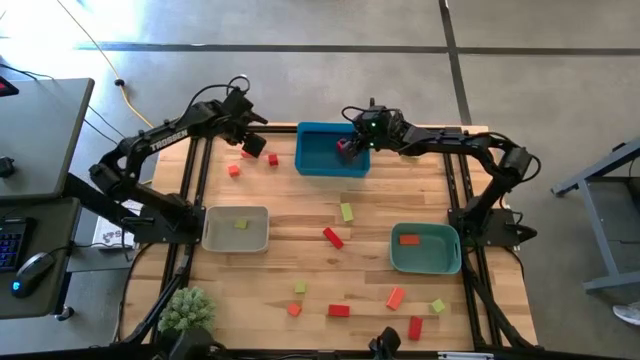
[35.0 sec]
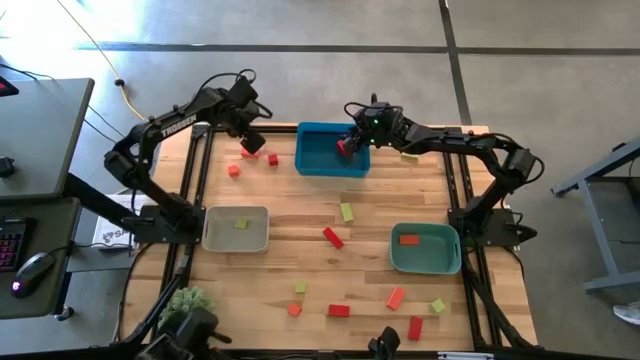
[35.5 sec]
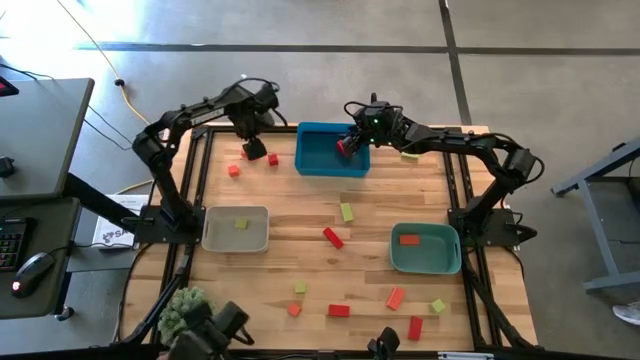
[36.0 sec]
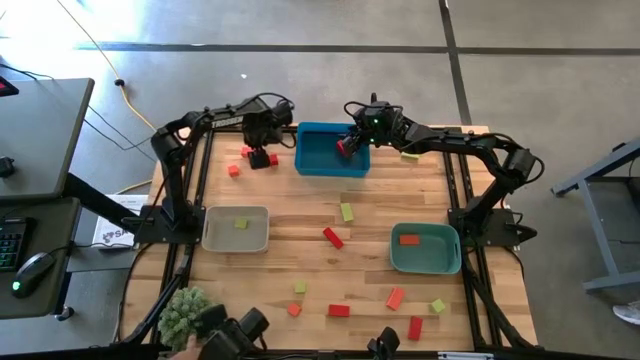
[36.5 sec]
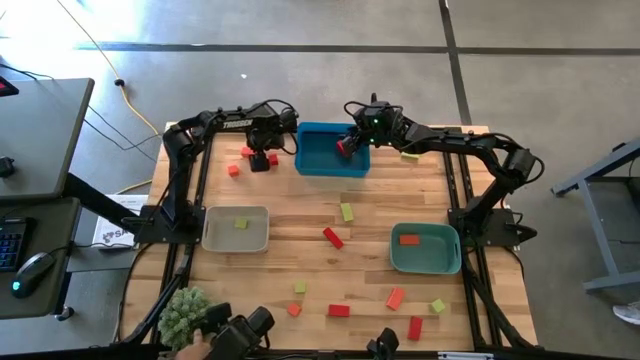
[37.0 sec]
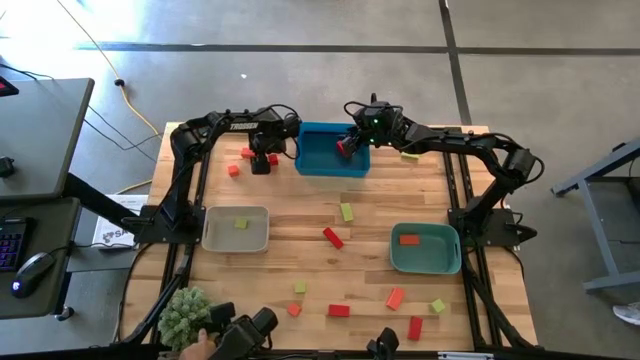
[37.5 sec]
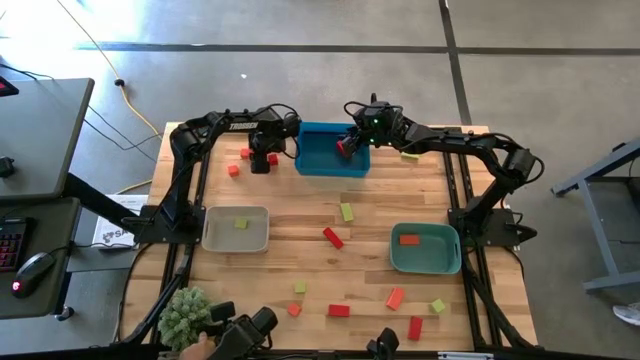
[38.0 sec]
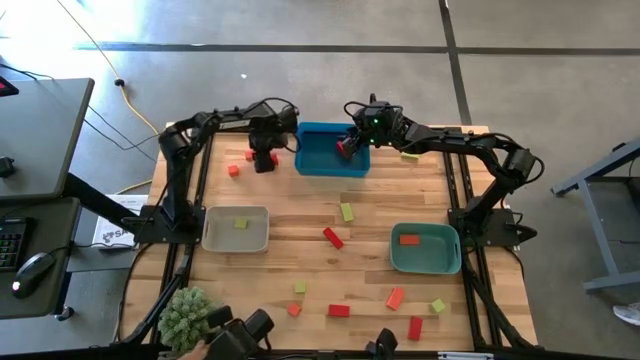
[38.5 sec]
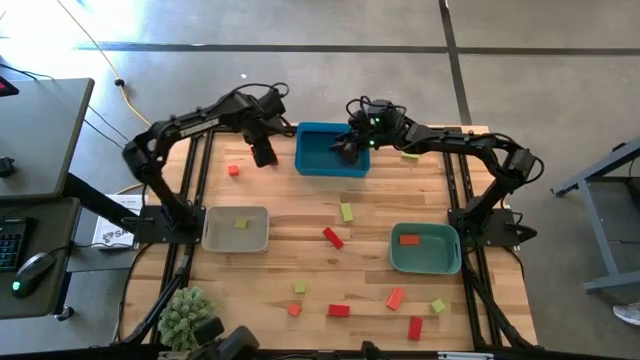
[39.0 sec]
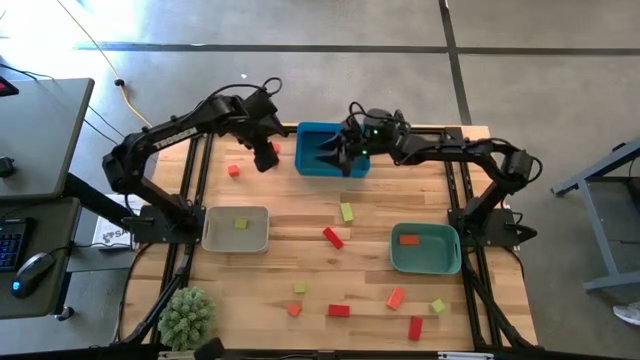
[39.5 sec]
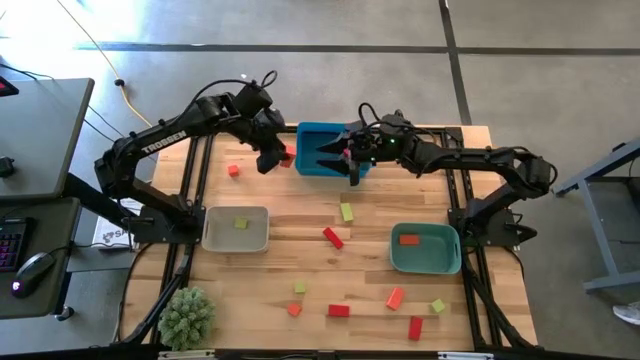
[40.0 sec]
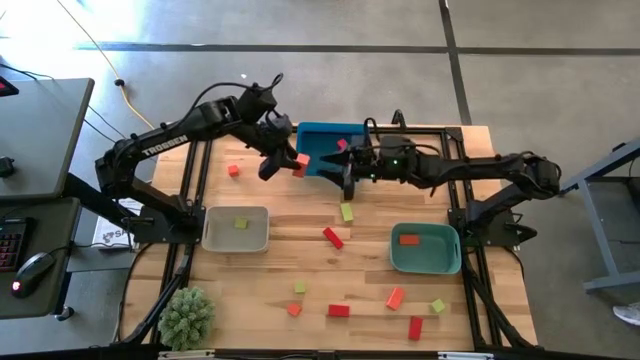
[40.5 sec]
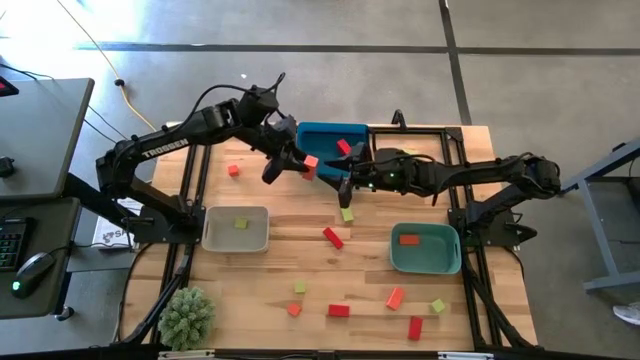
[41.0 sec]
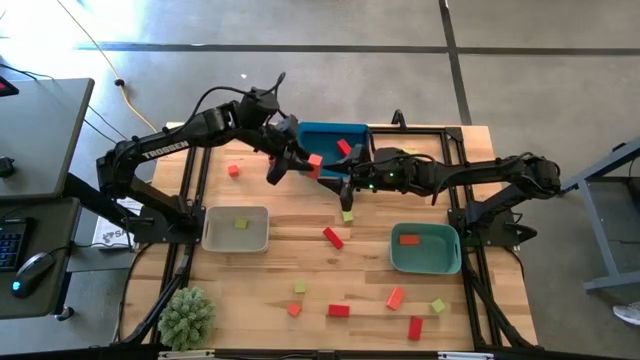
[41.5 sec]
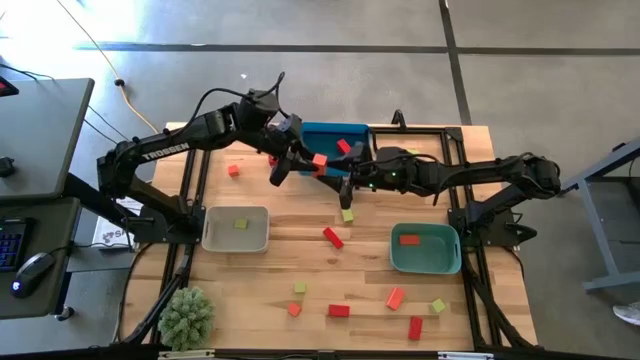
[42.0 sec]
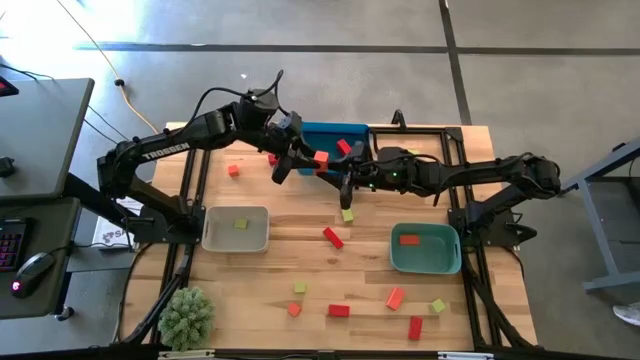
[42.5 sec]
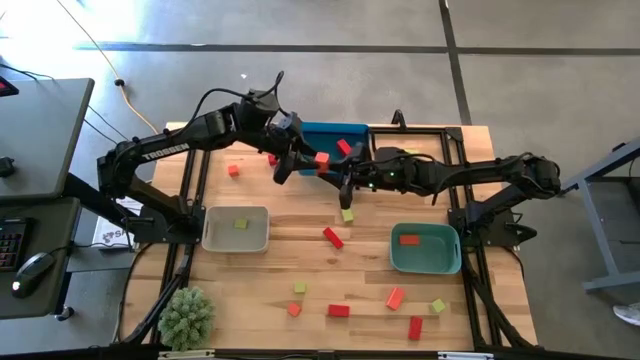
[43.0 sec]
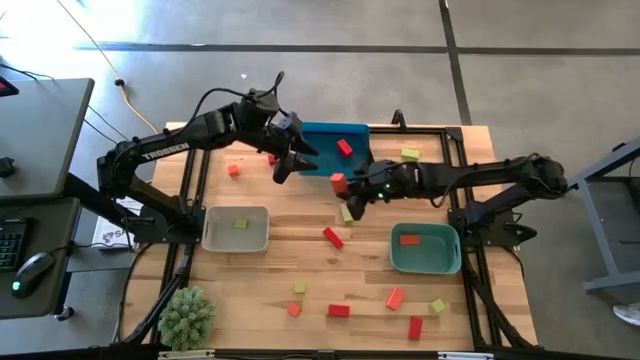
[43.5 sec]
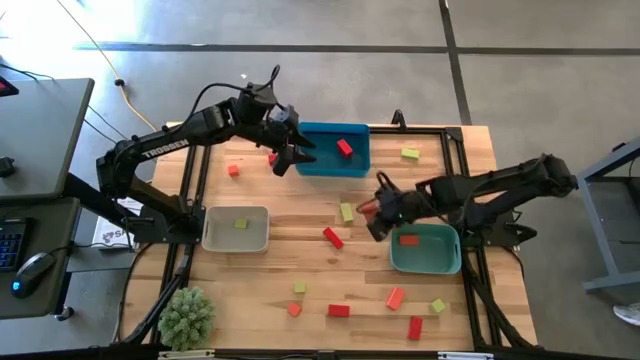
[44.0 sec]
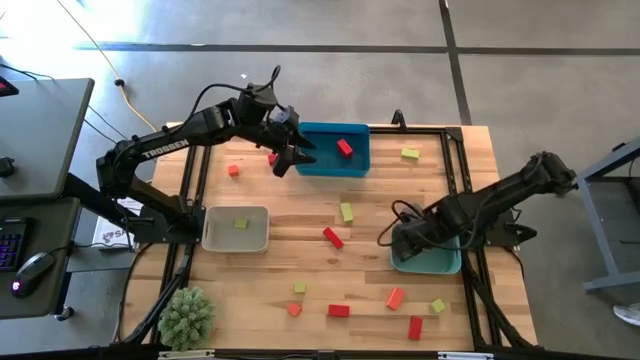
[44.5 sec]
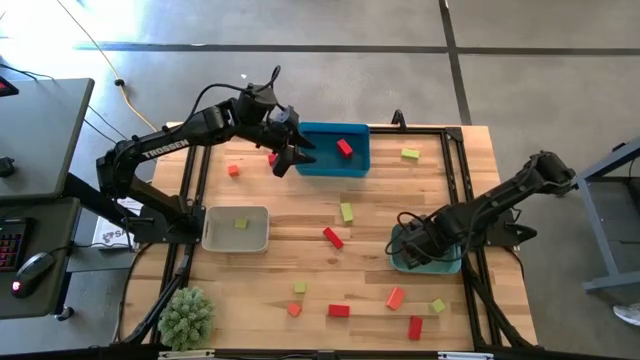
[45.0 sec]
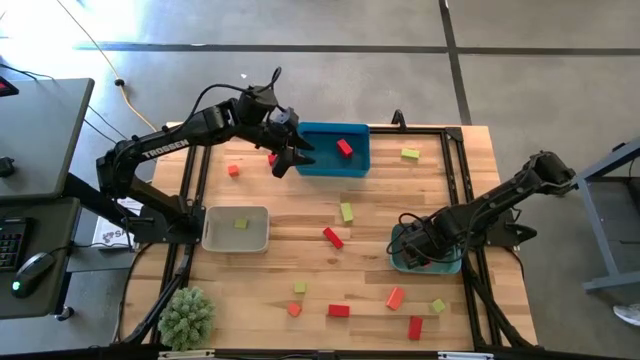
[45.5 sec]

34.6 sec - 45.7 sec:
Task: Sort & place blocks by color
Put the top orange block into the green bin

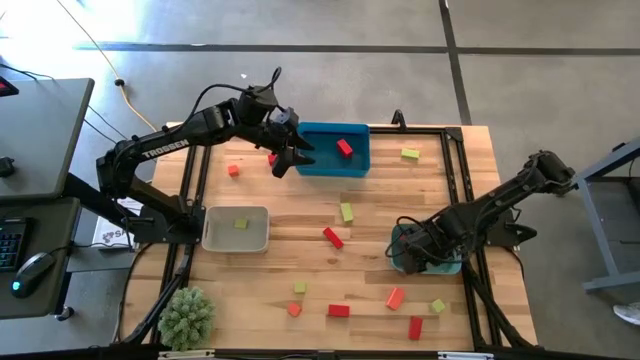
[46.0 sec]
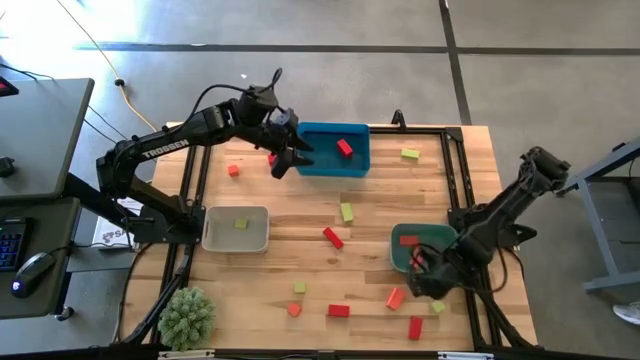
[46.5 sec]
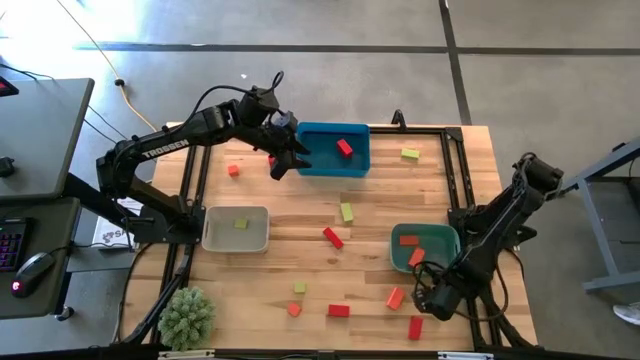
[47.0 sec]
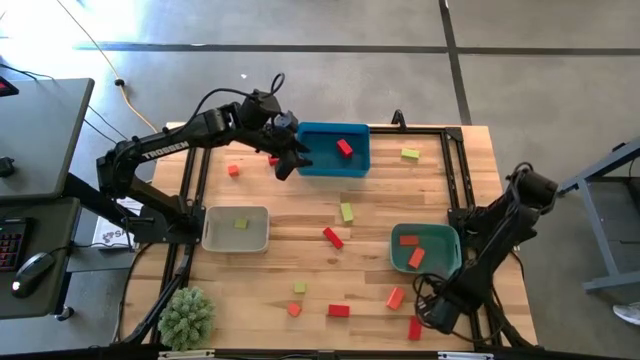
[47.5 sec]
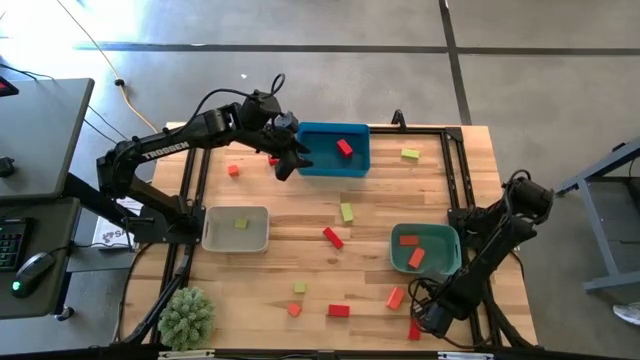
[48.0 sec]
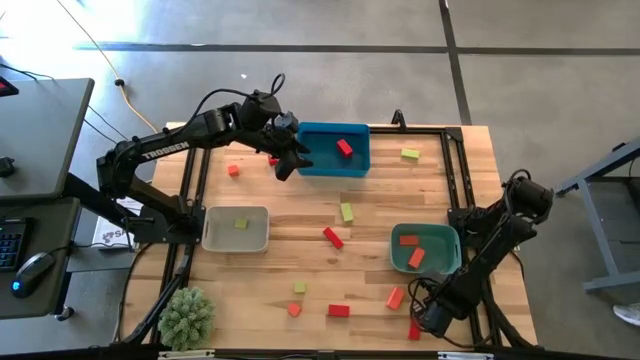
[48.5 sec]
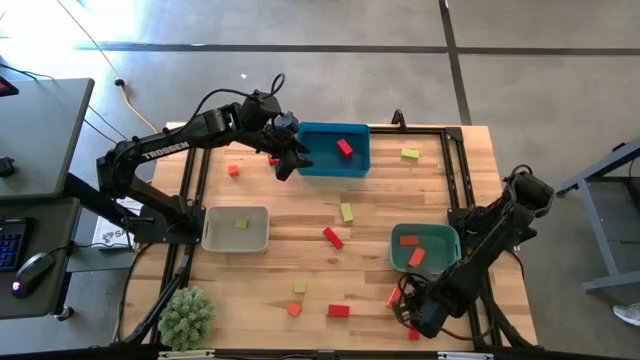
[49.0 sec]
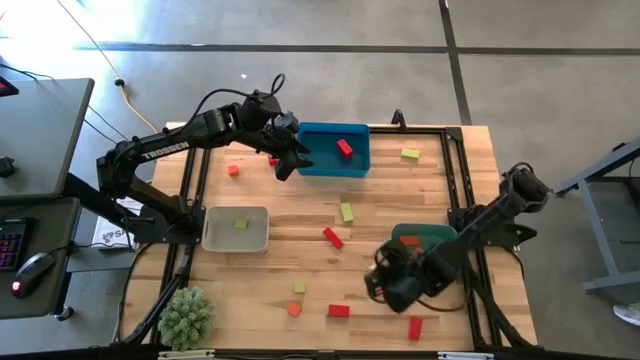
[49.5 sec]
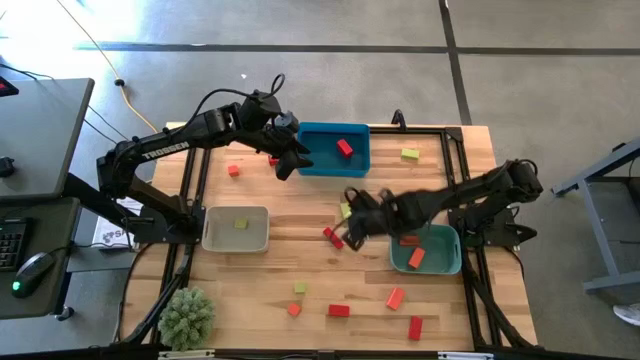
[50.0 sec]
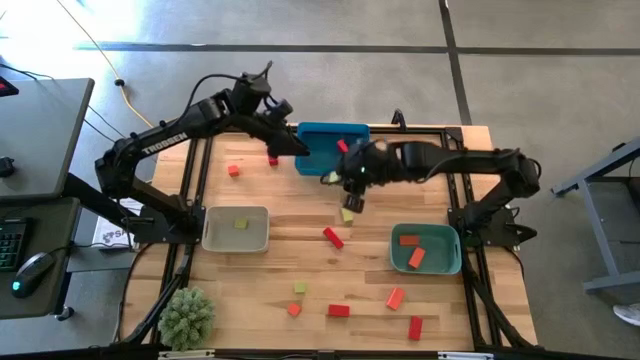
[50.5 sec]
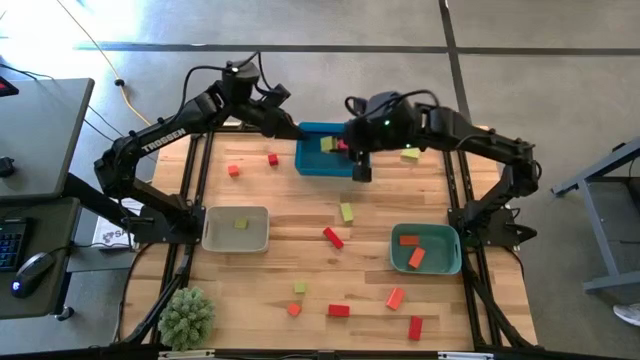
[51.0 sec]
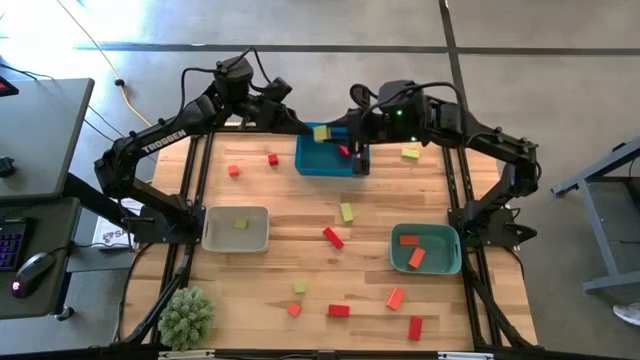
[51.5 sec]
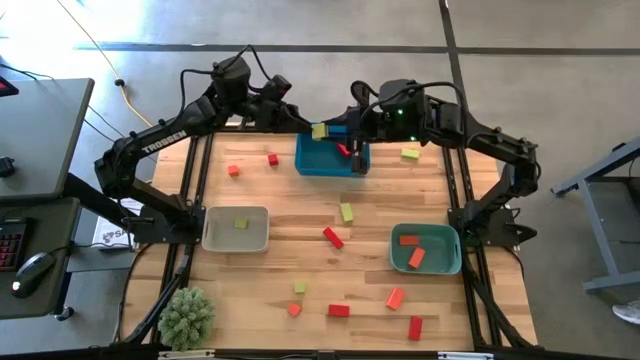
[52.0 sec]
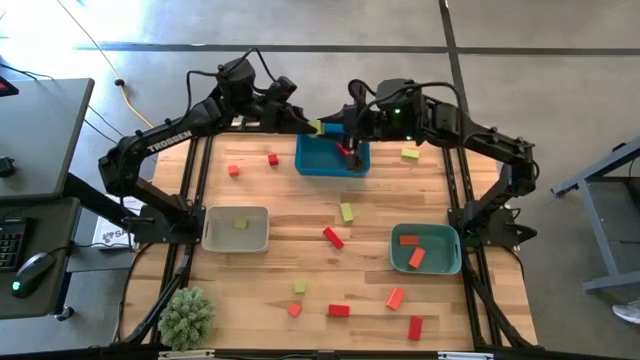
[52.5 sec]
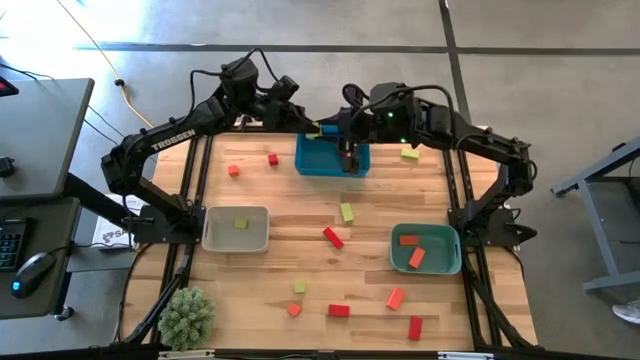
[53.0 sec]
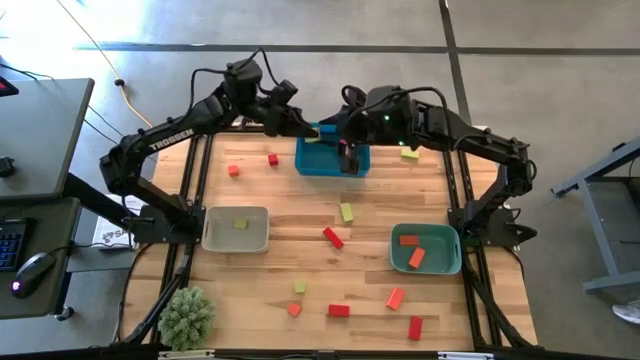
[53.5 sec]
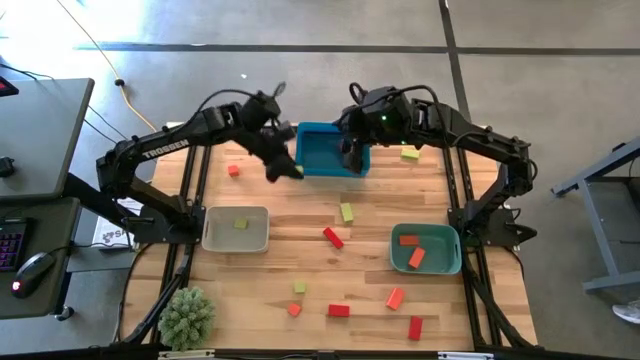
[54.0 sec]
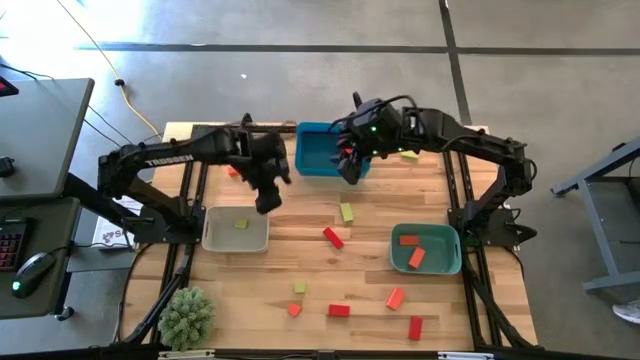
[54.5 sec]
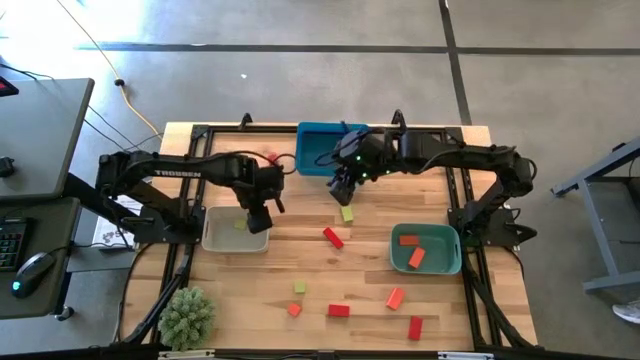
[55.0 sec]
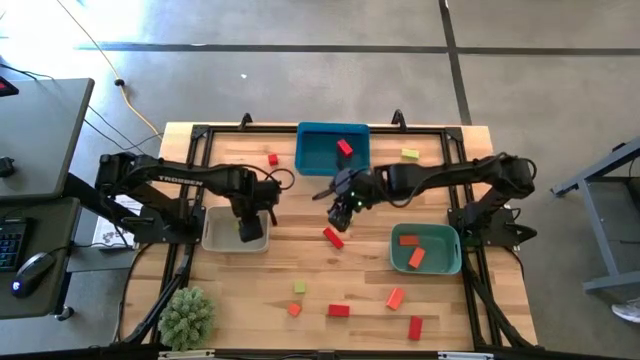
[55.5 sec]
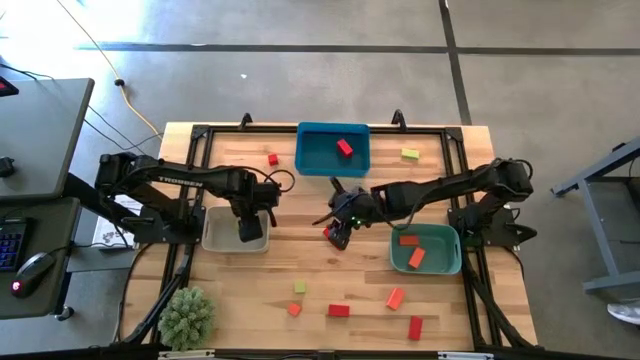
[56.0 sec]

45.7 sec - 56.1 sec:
Put the bottom right green block into the white bin
